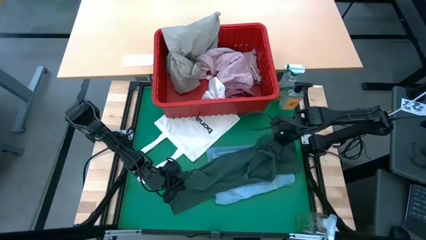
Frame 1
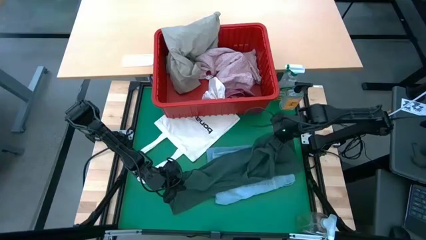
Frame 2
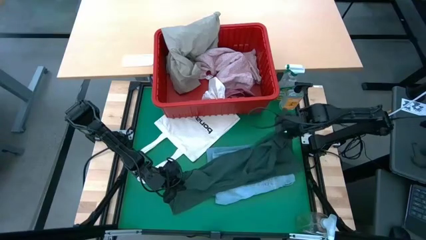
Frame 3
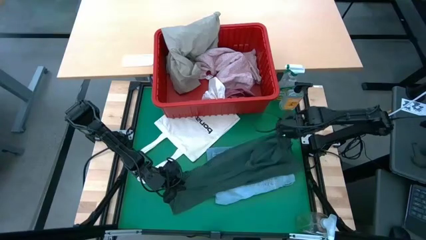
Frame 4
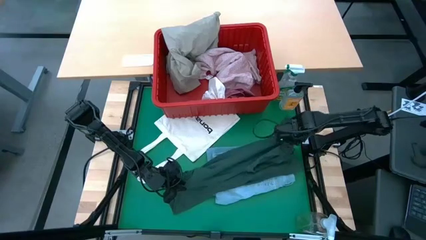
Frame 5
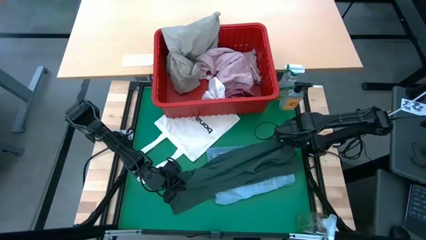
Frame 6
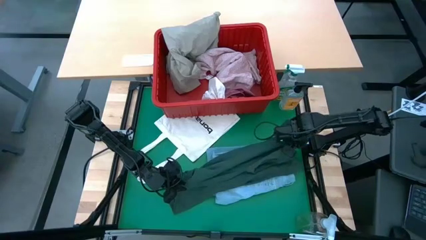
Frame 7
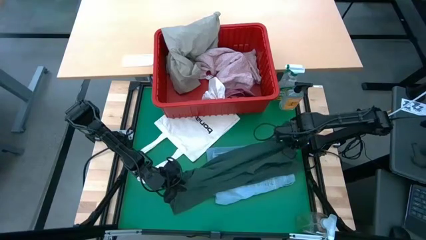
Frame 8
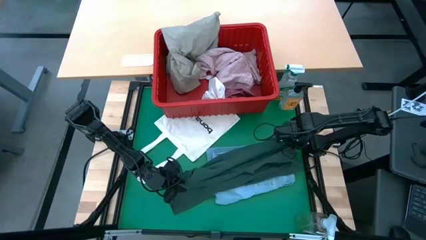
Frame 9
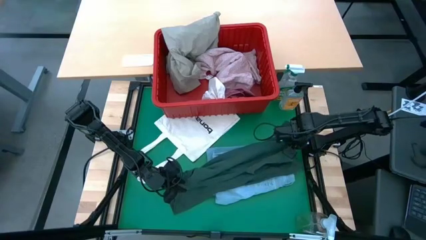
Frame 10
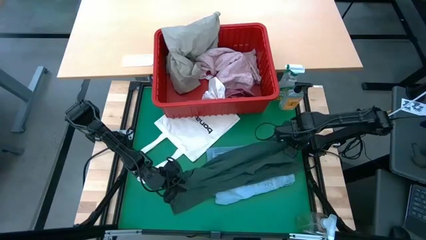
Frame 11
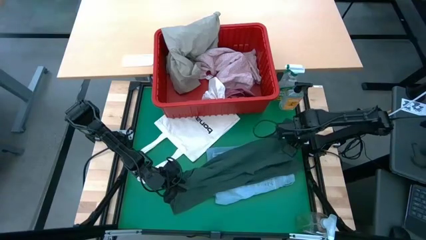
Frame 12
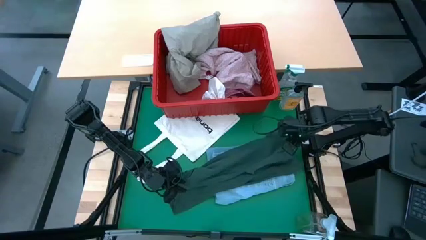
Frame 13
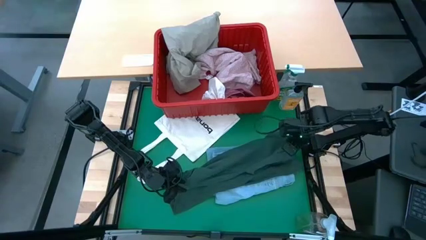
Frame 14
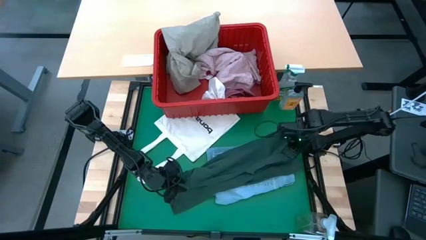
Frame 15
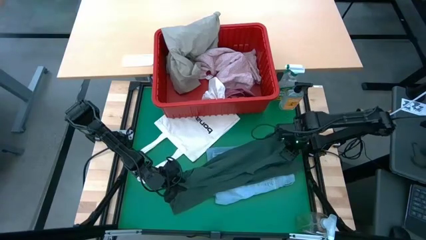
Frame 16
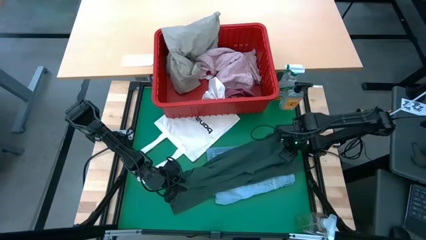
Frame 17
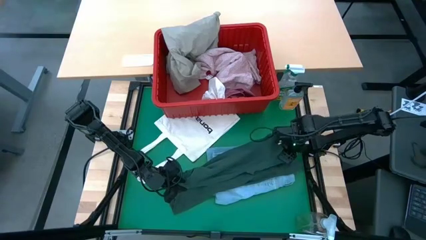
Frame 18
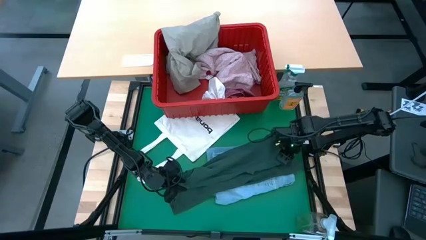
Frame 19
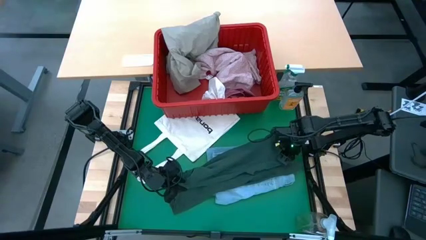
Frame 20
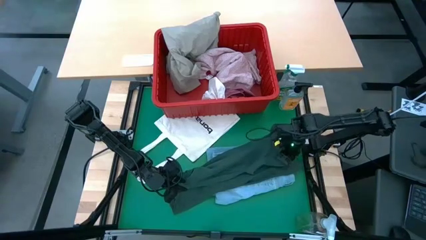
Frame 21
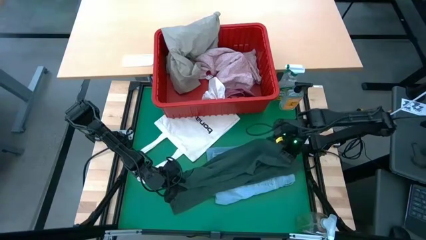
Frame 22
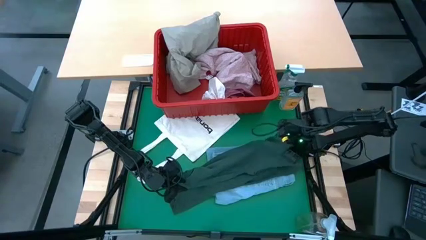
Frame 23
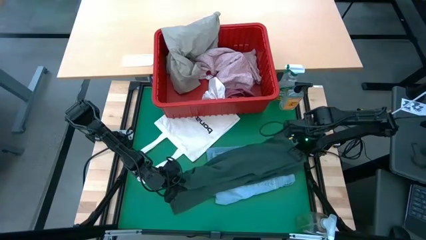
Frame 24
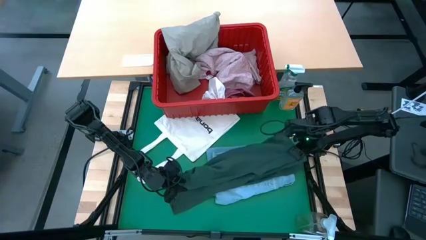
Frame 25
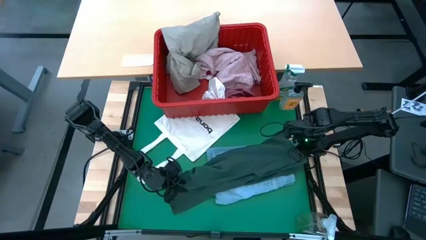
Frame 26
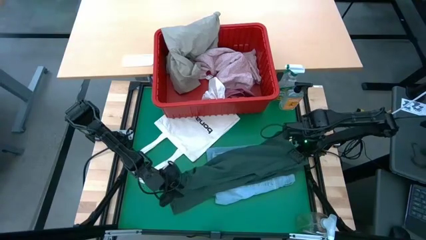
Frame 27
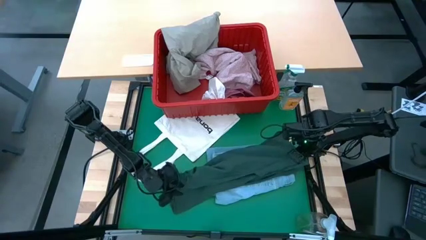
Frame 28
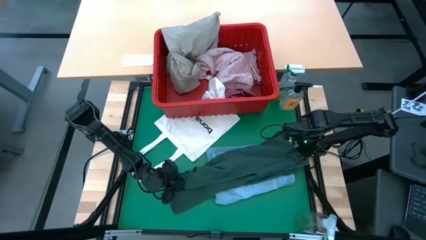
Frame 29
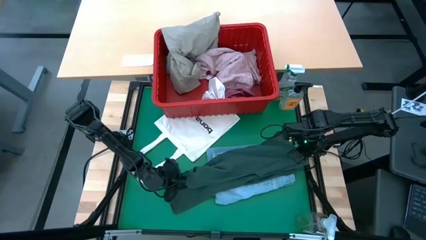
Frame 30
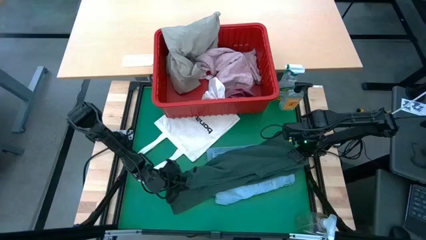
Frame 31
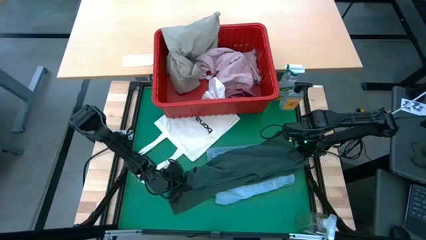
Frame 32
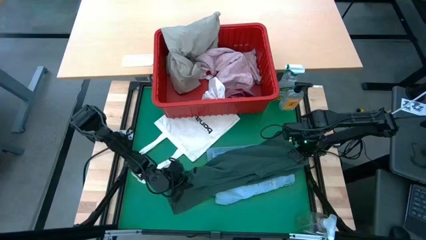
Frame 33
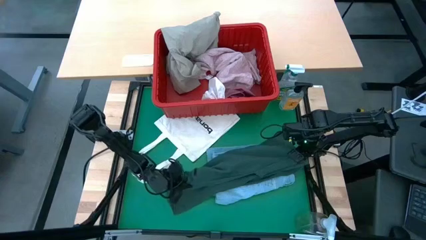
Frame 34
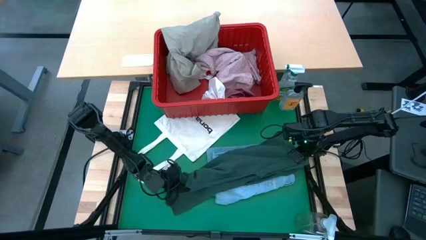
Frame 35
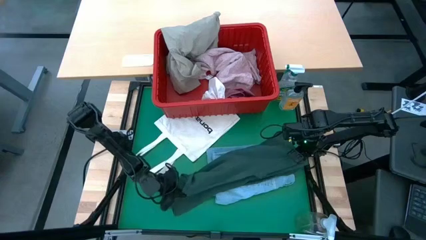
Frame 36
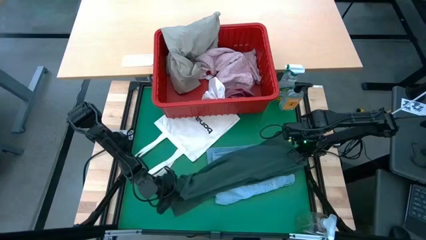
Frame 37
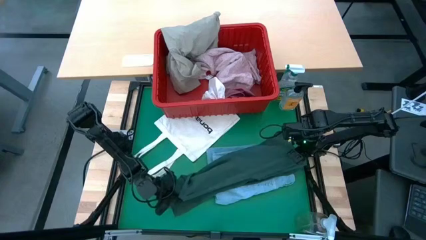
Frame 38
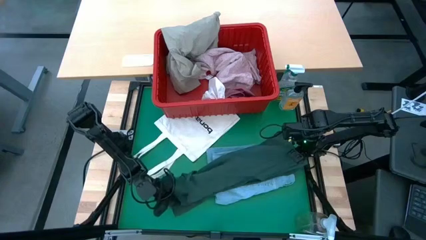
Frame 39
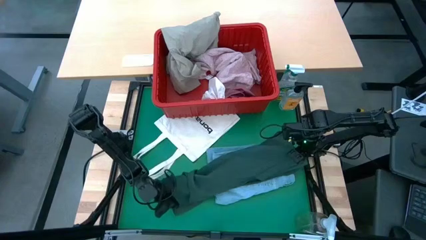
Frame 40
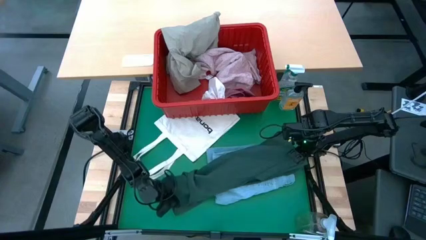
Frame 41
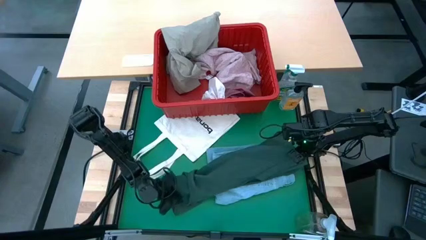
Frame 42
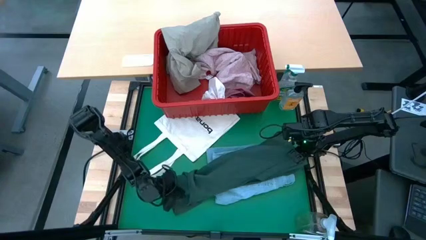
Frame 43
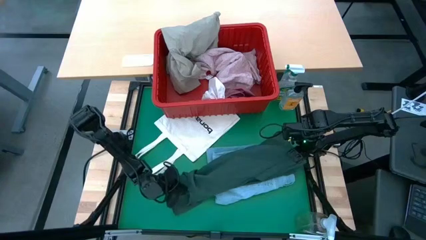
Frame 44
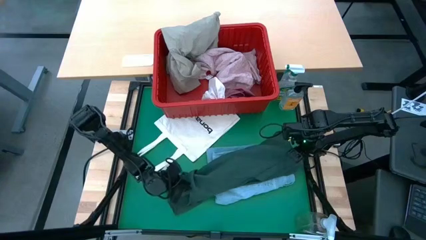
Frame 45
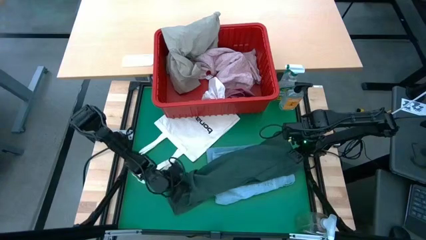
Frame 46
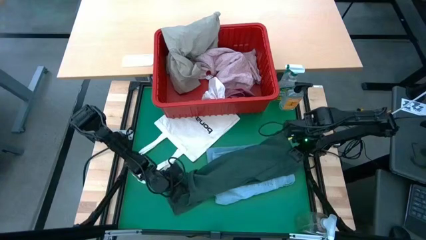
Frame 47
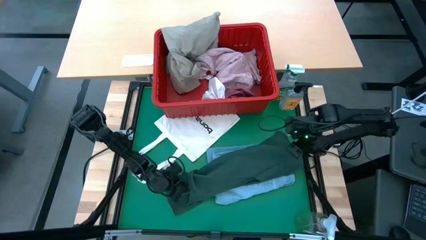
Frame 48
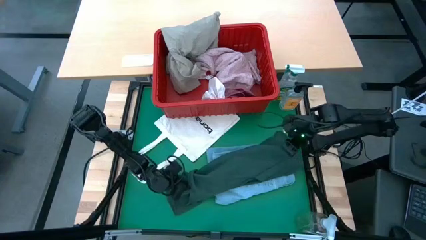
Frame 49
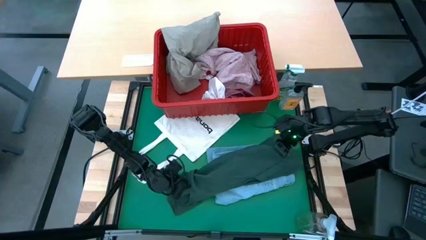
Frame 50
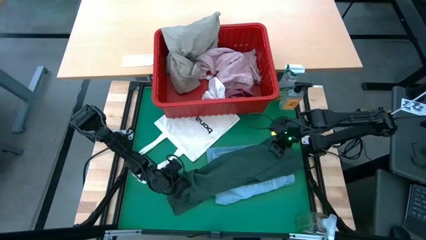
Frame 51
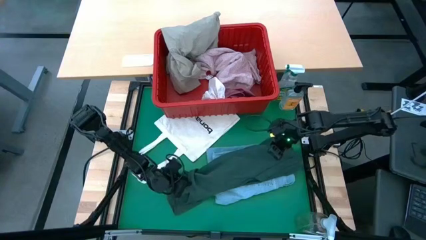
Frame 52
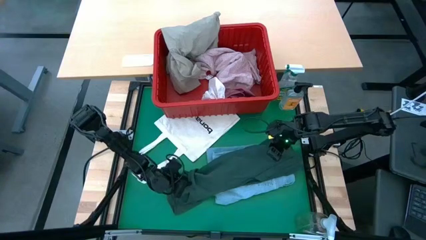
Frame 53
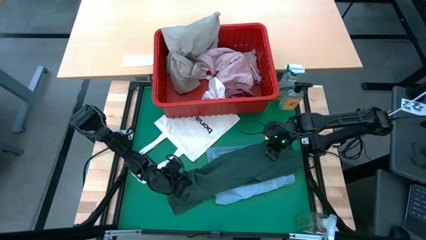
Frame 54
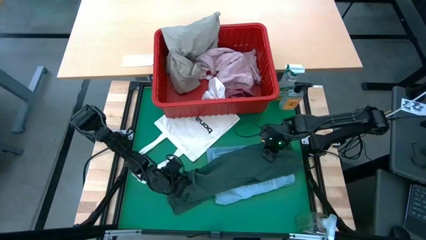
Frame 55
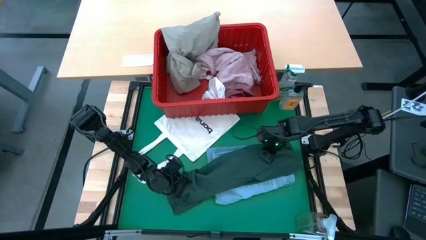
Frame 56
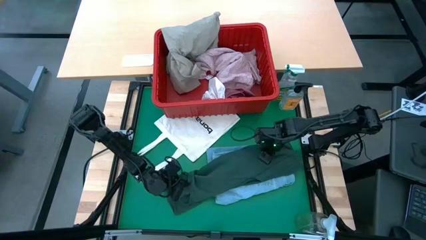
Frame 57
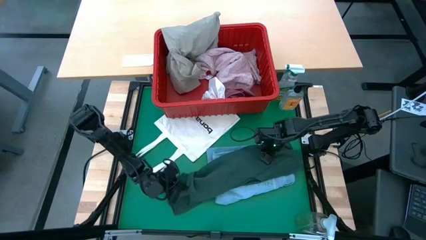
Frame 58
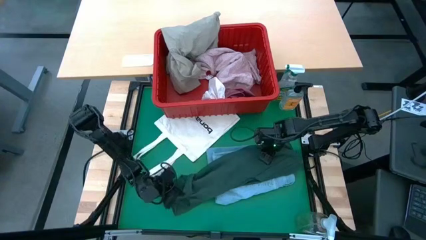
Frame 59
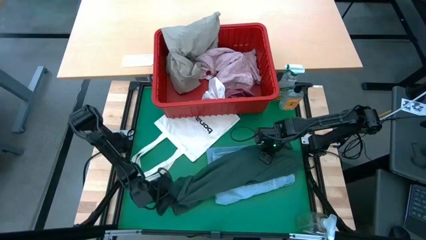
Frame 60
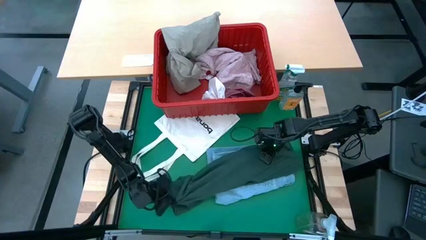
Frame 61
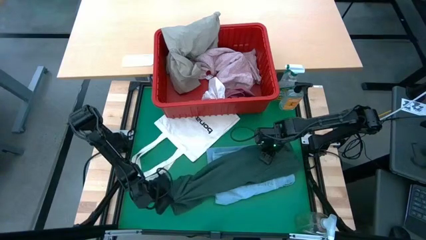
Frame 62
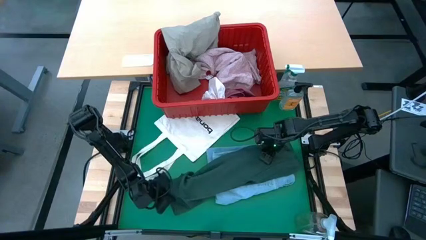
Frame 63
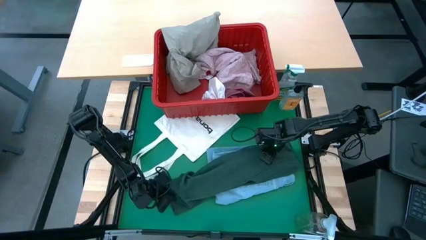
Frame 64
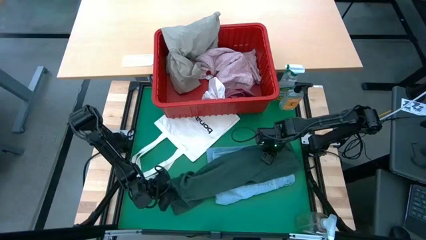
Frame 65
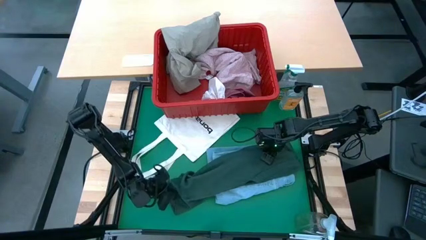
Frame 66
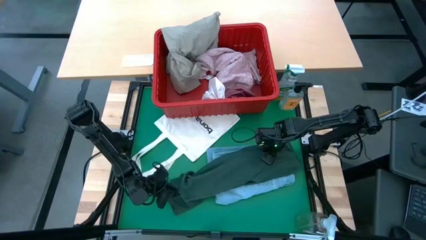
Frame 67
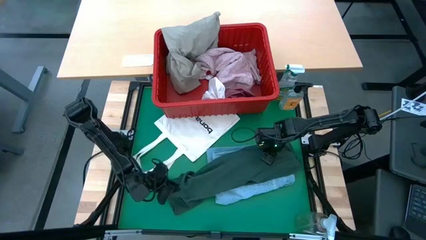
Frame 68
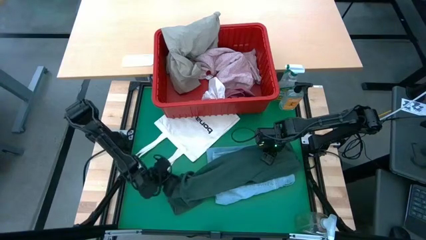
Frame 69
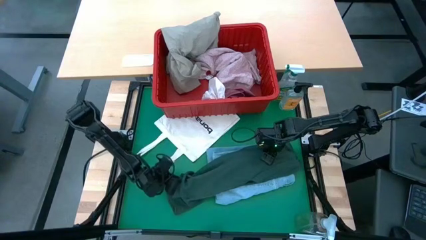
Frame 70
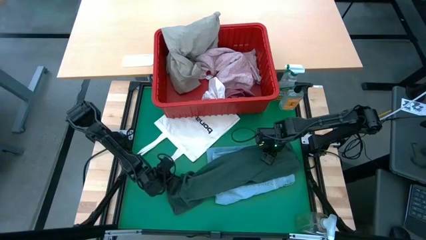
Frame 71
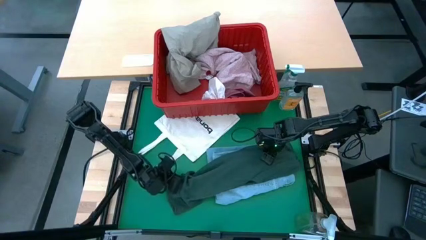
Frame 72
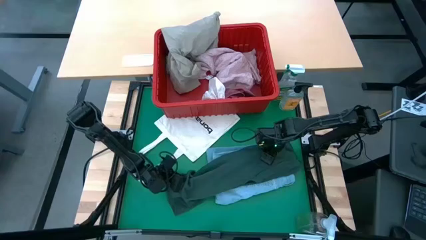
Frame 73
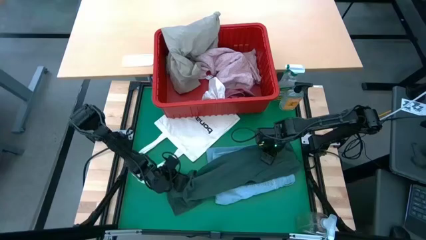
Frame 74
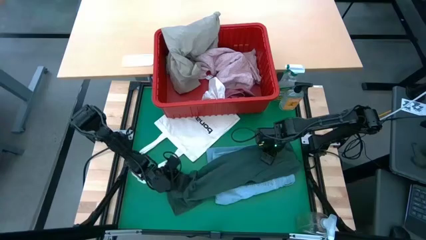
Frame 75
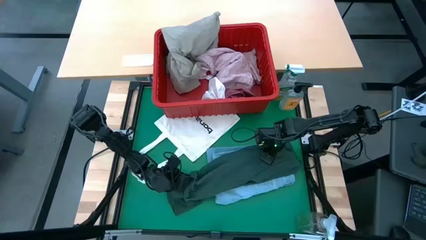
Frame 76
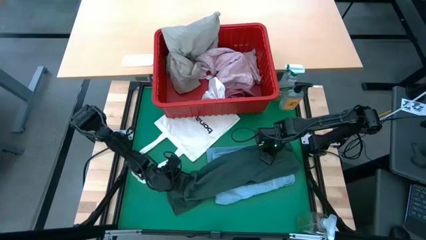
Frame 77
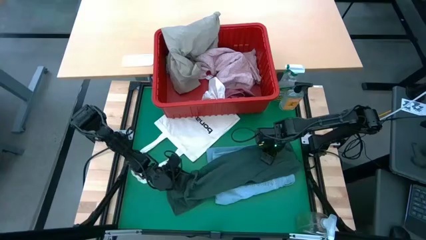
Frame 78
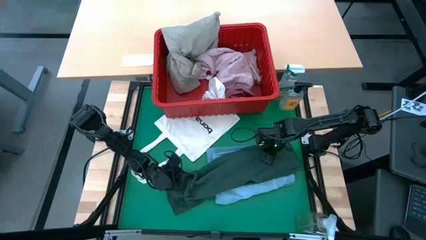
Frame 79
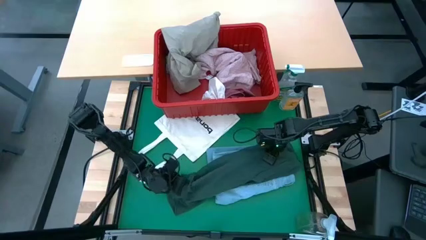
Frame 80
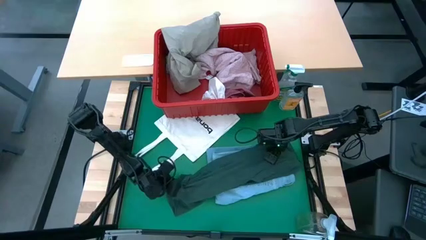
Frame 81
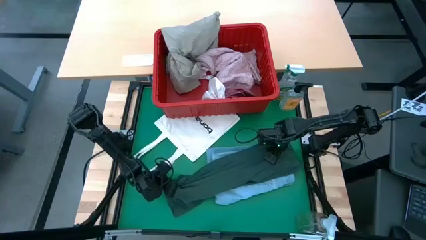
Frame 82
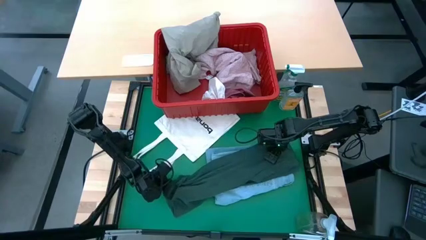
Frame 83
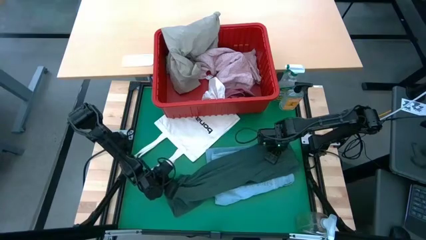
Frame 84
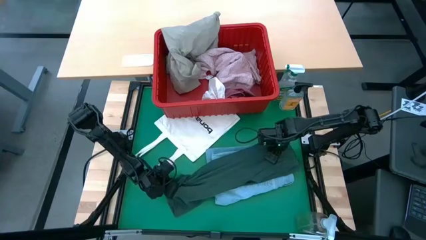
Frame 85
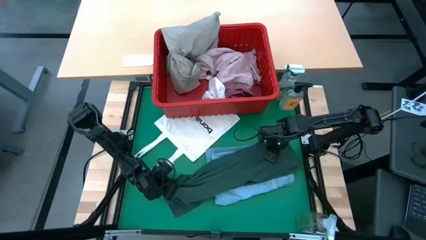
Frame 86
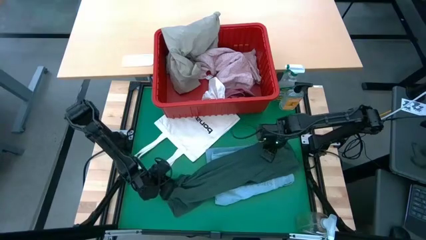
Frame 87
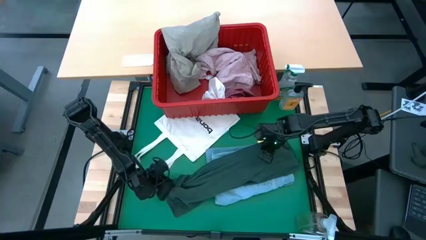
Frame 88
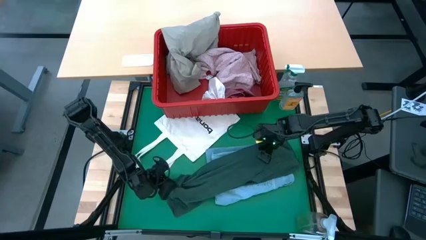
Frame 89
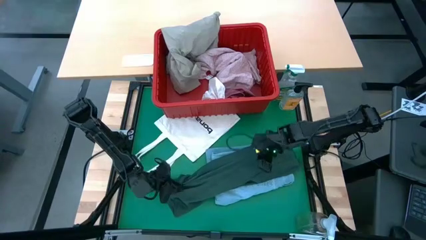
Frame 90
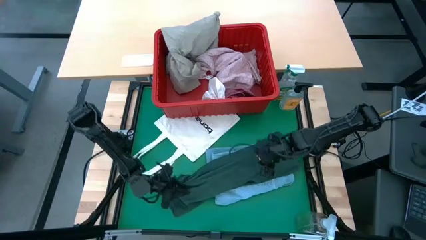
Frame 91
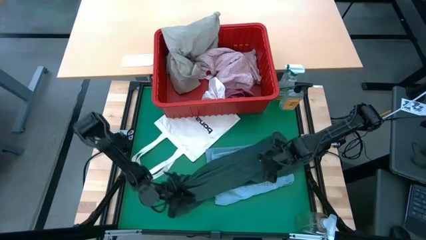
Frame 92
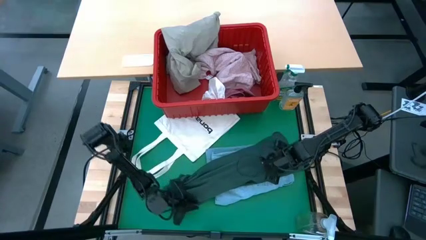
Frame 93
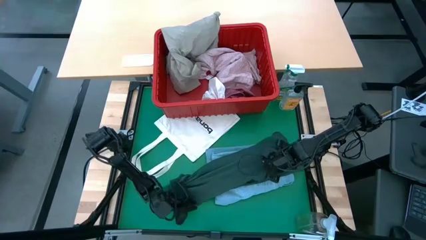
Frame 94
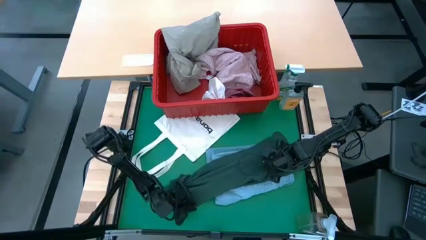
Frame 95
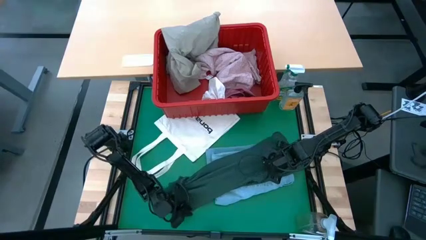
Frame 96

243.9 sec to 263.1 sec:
Task: Fold laundry
Fold the green shirt
